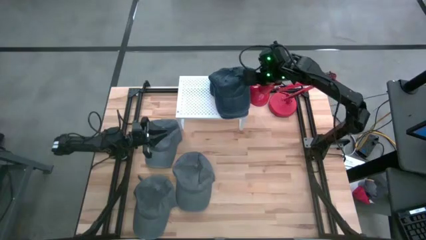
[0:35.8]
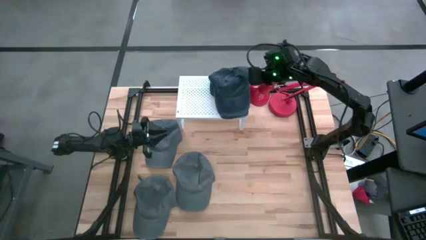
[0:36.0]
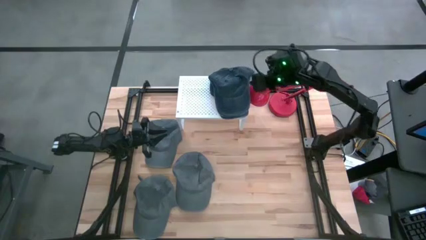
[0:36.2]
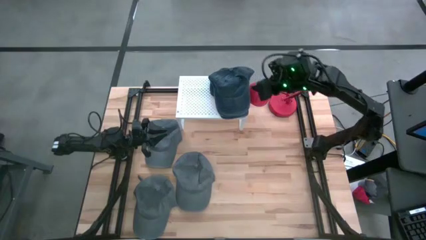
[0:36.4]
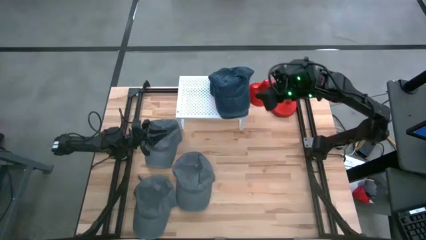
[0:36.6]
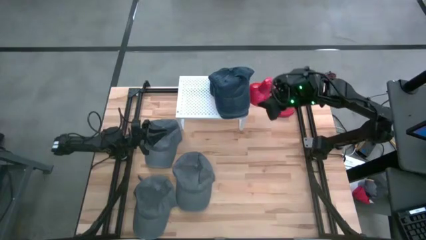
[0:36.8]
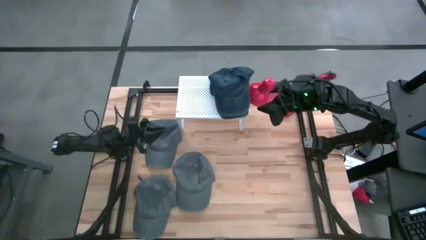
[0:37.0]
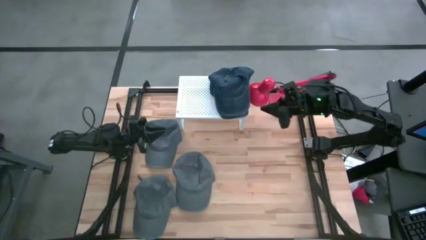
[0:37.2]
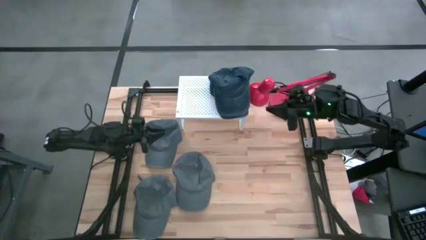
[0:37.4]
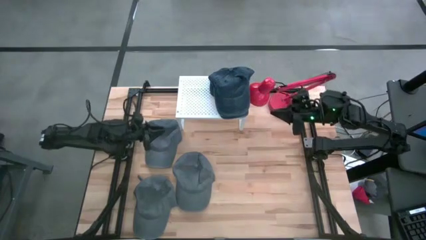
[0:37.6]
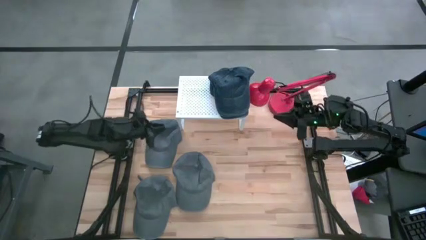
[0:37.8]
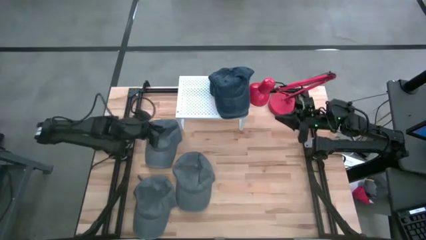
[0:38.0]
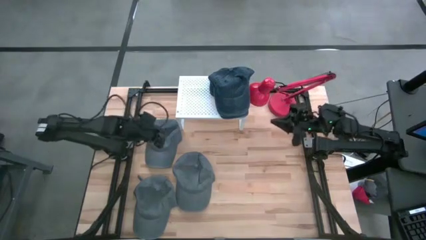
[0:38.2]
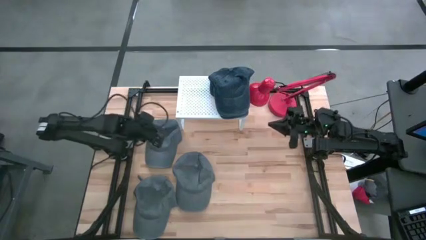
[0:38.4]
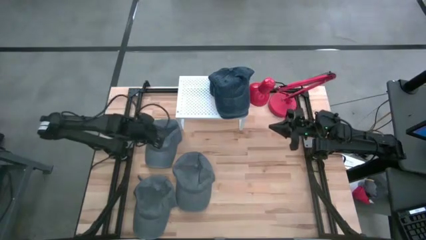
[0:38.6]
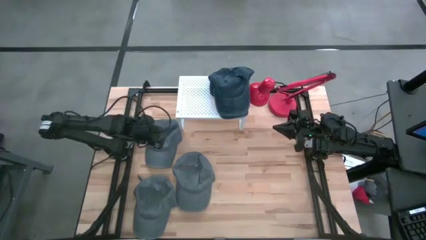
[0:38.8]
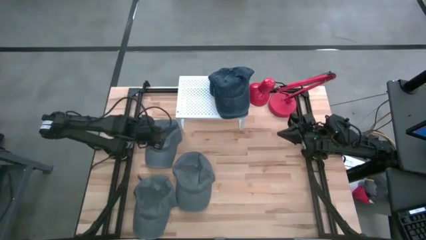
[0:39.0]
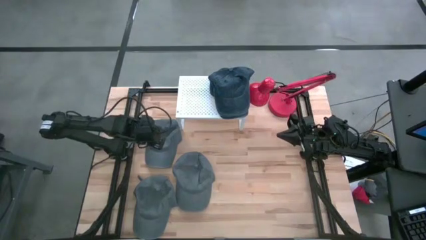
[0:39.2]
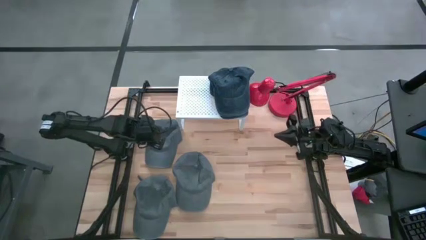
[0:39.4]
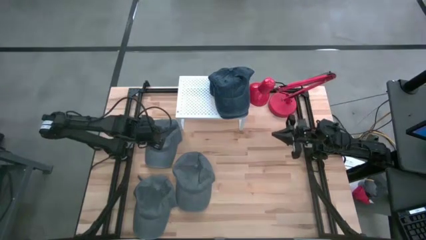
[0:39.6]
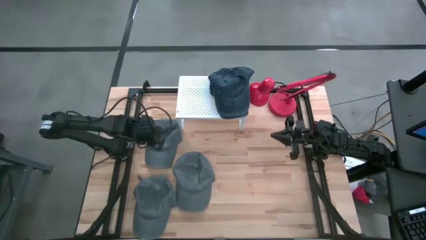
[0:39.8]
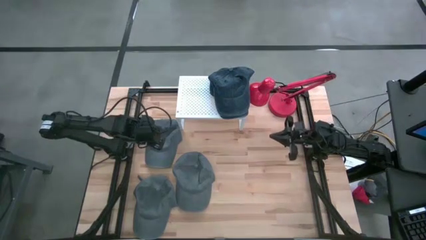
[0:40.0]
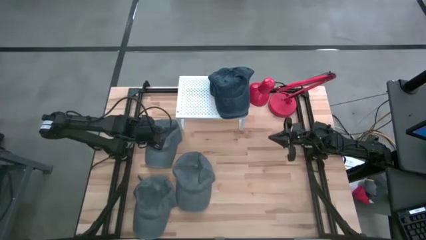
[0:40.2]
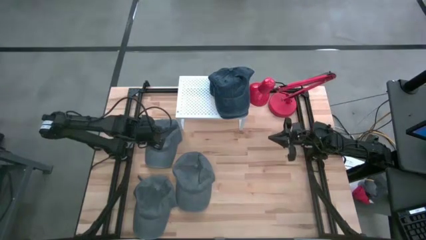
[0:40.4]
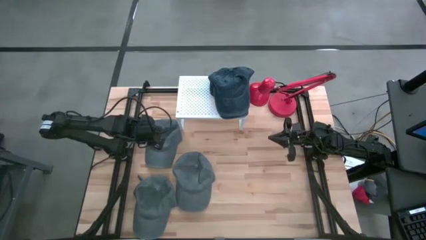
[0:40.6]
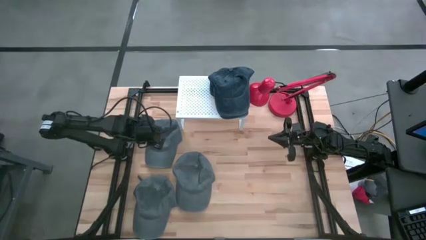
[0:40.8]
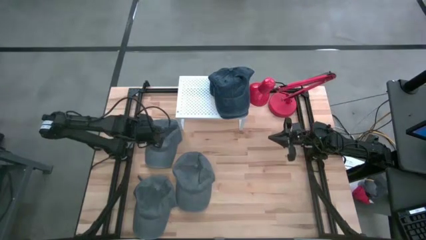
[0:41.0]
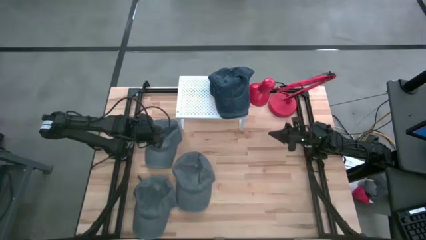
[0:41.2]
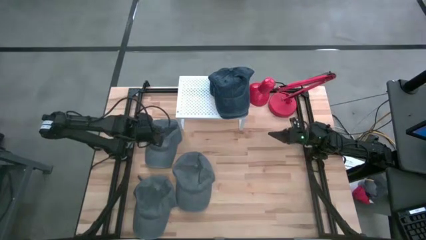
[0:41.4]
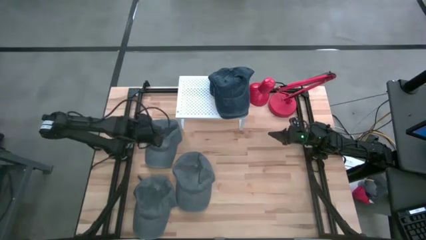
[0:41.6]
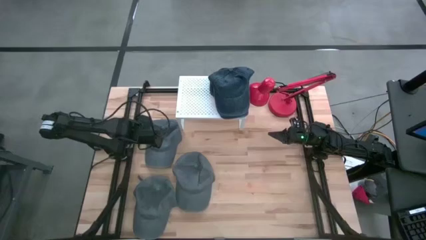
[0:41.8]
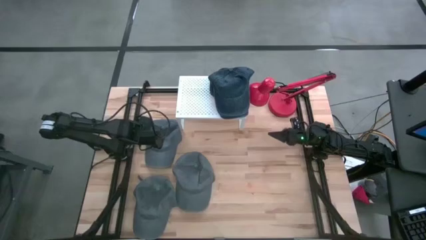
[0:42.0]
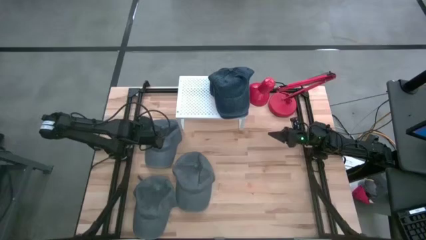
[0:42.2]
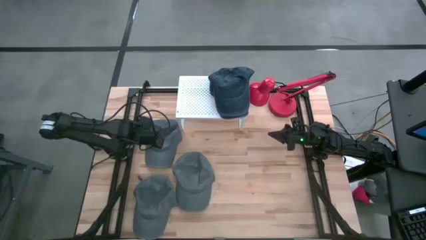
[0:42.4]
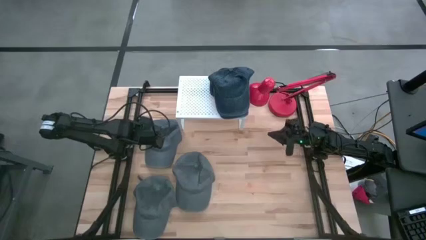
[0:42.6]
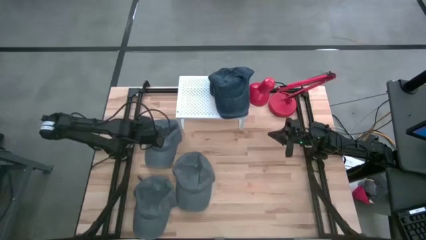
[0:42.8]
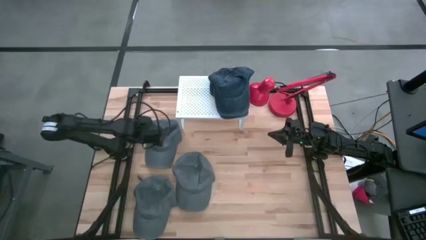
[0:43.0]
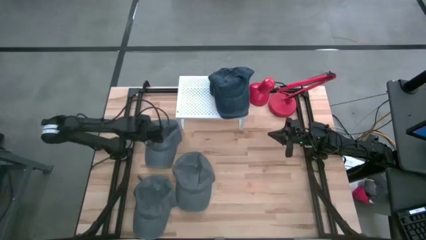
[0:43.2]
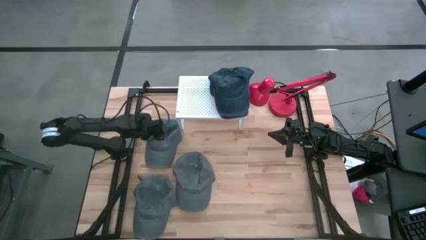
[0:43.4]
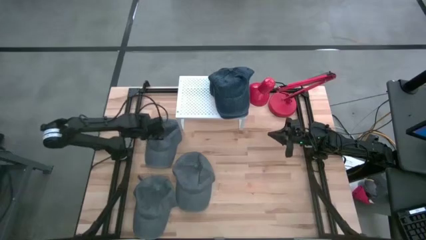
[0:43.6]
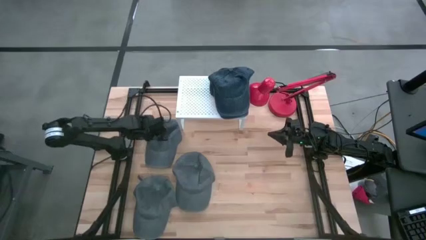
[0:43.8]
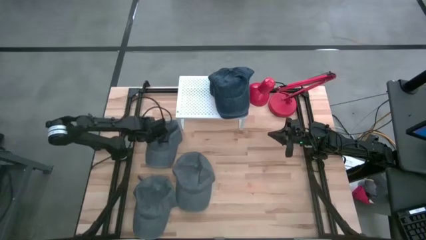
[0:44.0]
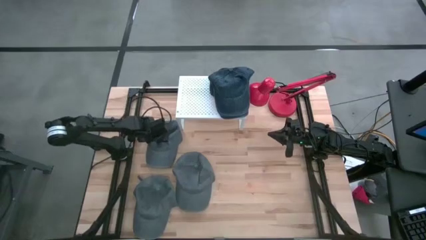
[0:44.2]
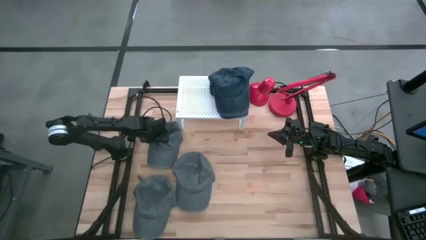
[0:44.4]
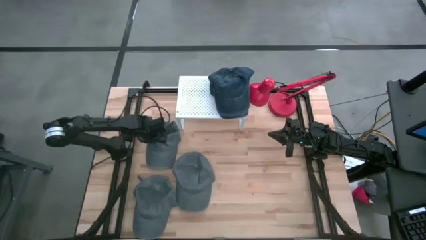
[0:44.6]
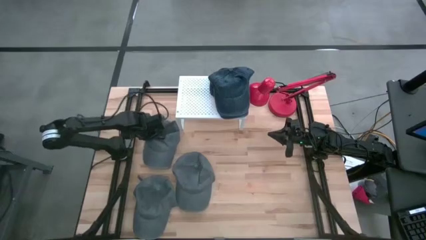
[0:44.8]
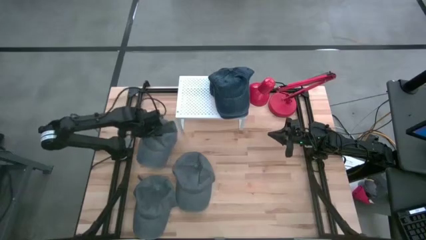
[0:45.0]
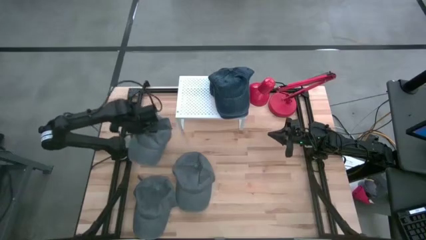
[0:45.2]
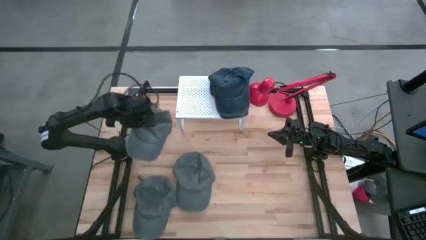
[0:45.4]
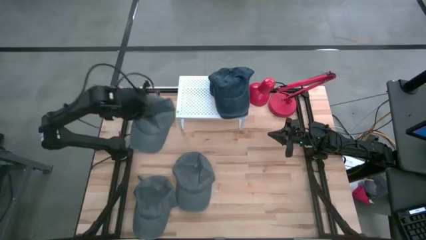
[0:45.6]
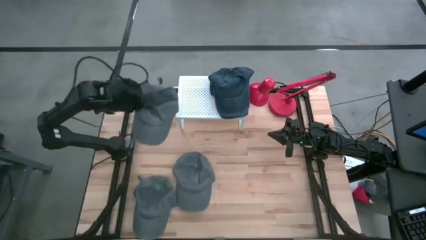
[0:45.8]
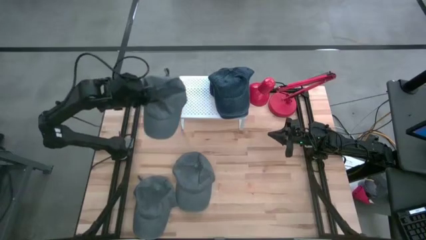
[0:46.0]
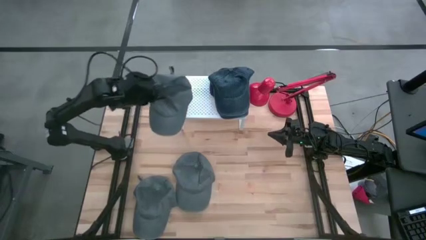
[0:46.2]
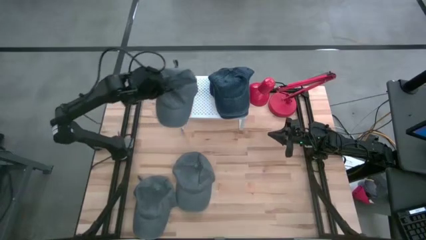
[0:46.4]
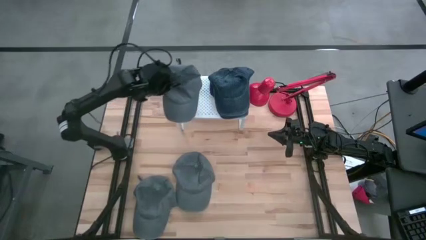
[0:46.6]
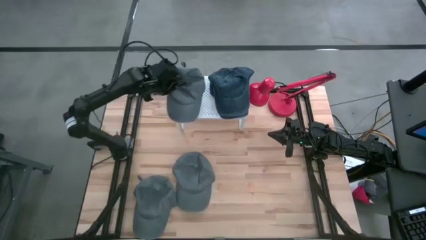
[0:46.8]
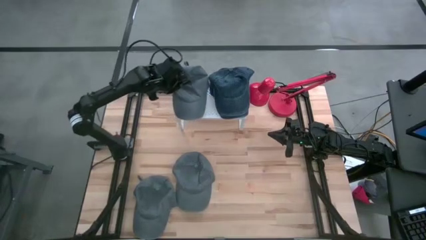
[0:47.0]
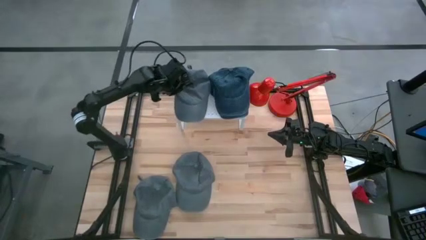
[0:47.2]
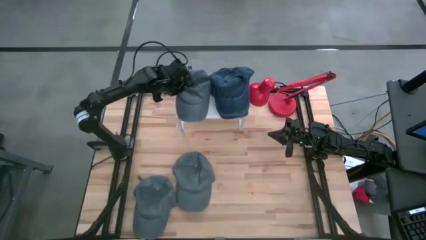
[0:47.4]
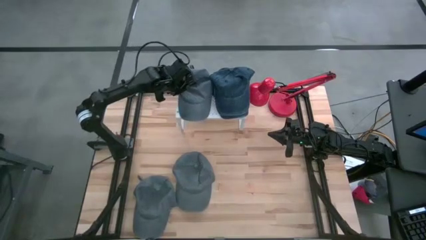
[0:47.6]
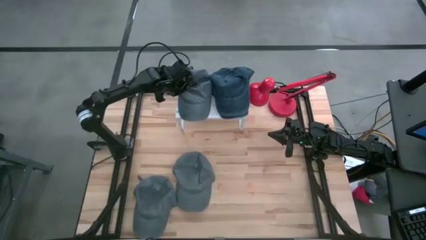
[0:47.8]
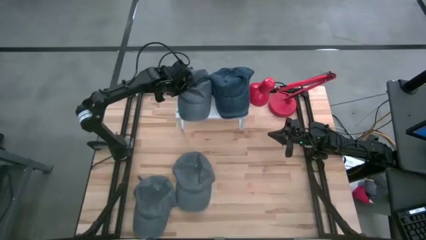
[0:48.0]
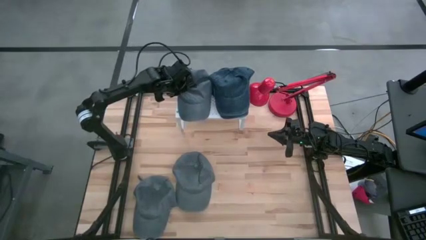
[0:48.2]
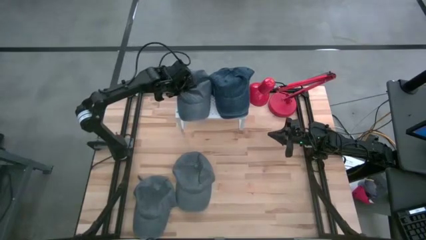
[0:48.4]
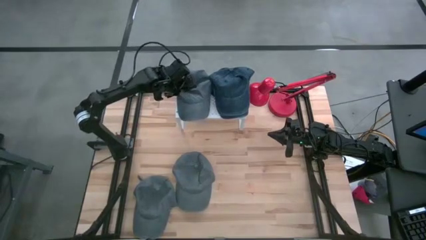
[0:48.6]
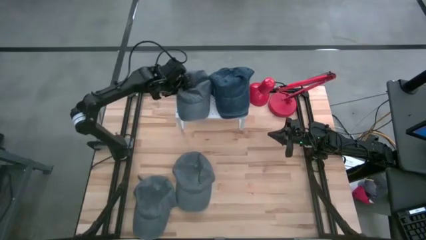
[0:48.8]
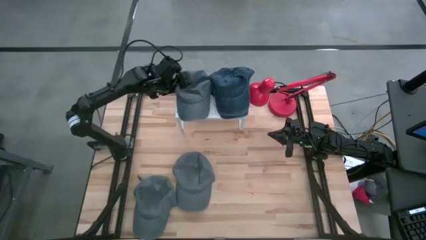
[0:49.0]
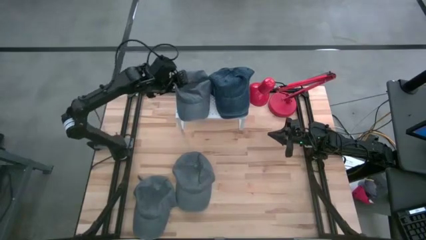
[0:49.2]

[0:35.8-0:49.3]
Task: Pick & Place hat
Put the top gray cap on the shelf

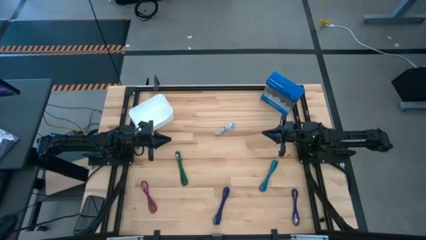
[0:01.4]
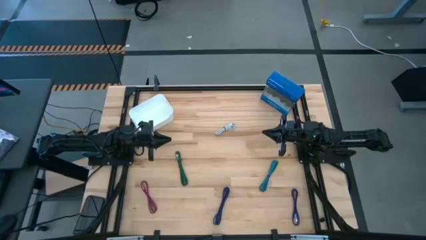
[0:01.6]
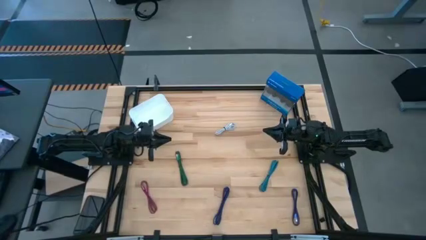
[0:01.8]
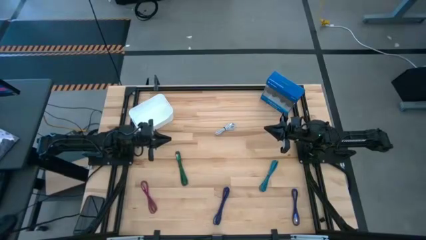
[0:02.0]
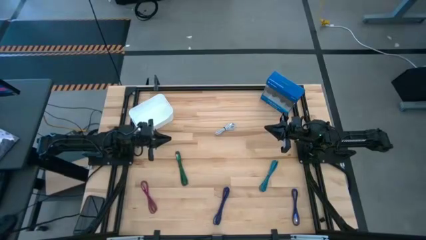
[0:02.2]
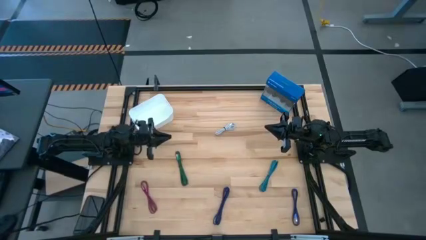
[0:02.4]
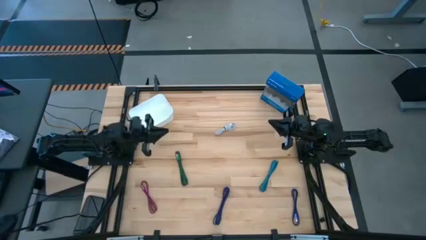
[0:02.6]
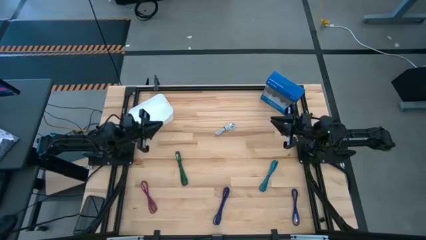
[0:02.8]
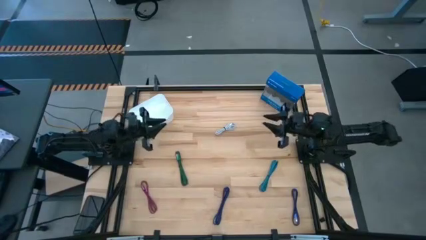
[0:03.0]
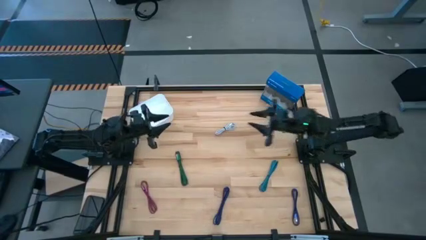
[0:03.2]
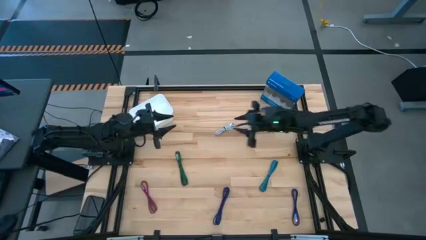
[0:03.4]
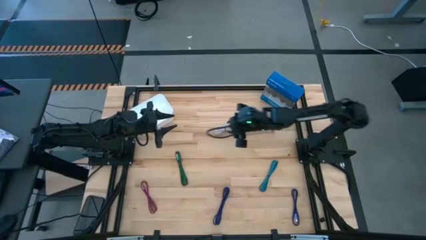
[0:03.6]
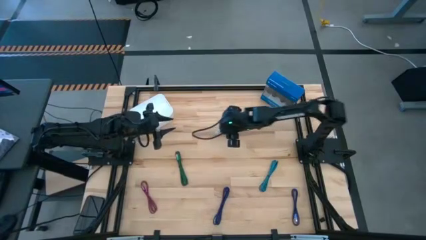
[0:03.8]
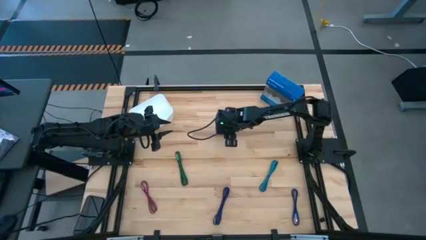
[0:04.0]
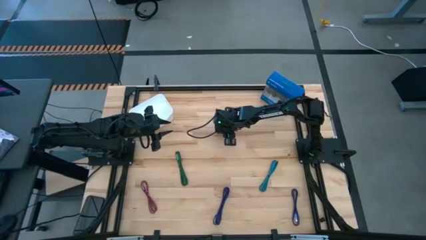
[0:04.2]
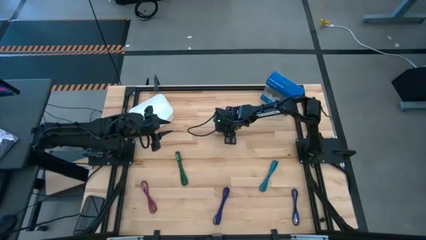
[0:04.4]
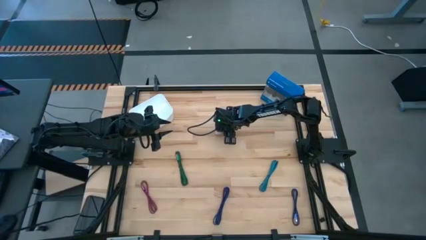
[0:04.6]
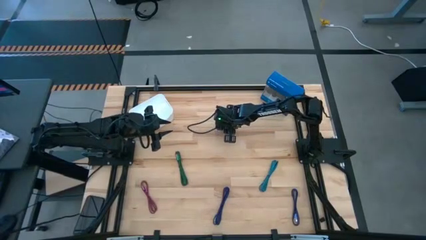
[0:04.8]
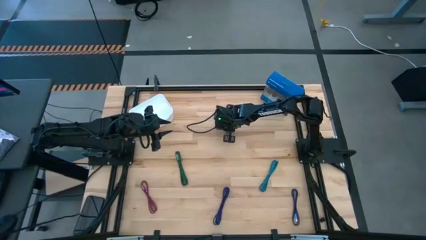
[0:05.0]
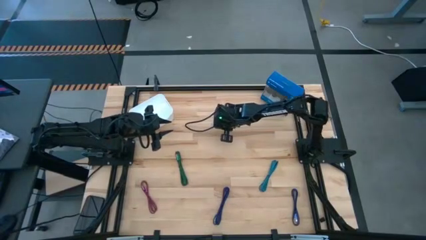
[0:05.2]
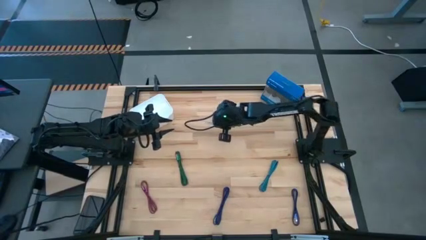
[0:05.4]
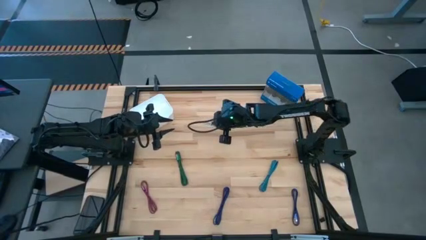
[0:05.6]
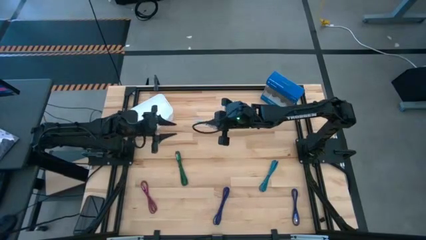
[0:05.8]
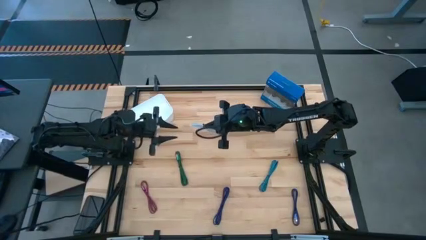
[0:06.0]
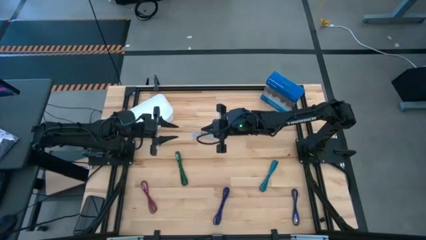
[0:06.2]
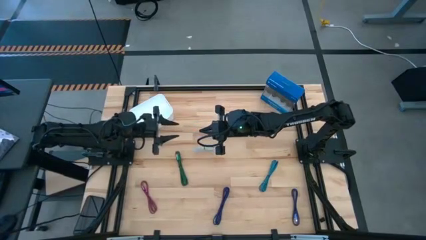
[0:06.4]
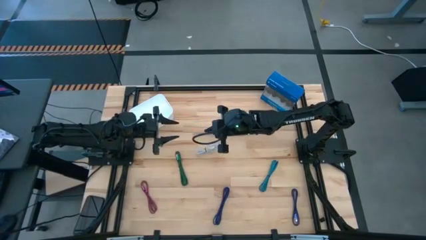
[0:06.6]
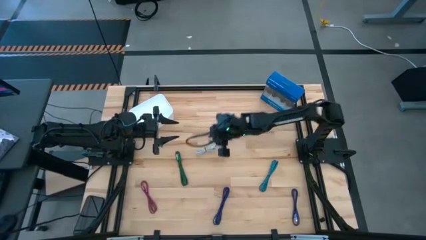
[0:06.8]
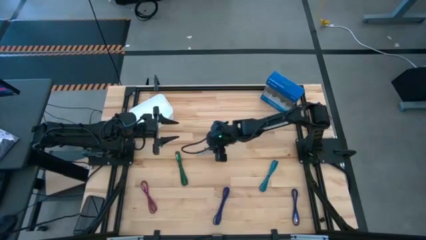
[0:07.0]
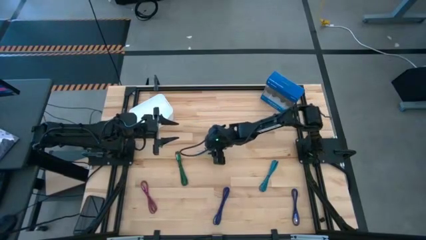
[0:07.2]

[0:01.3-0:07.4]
Task: Pick and place USB-C Cables
Put the white charger cable into the white bin
